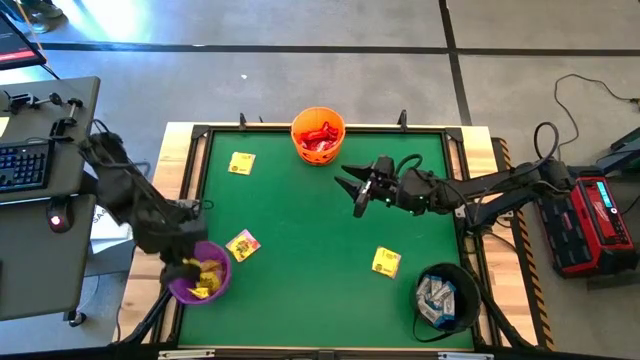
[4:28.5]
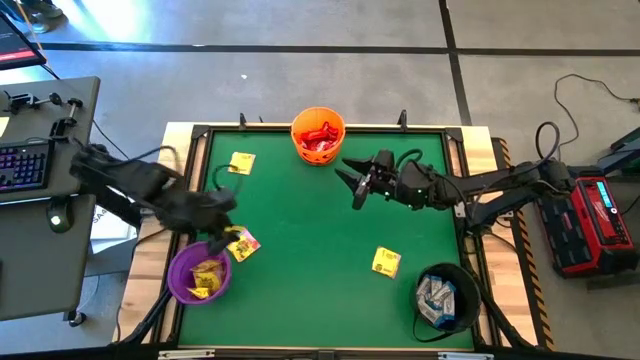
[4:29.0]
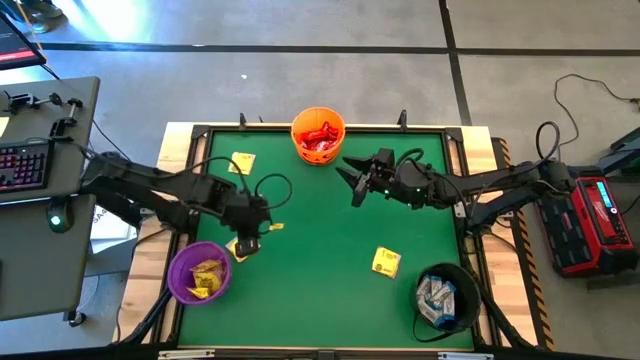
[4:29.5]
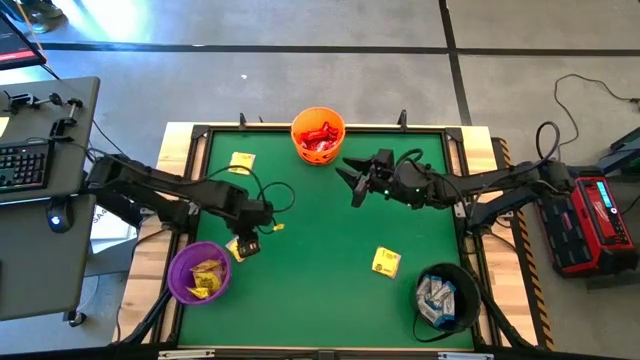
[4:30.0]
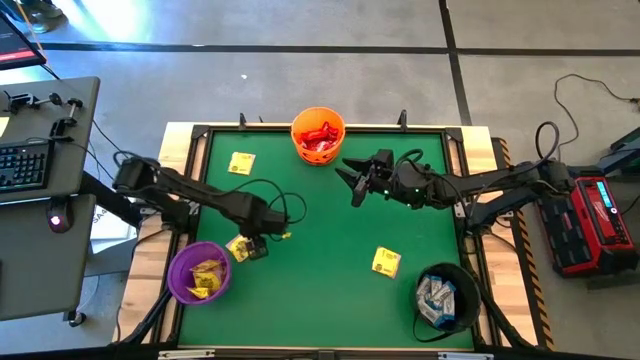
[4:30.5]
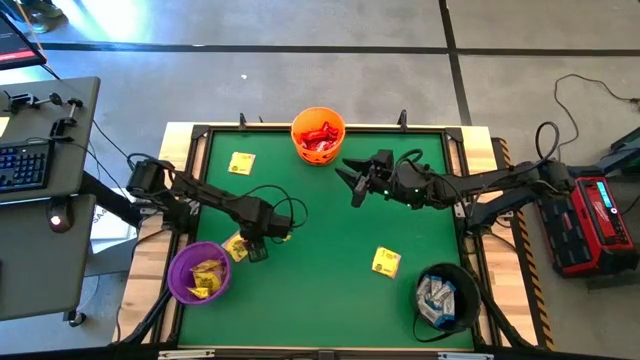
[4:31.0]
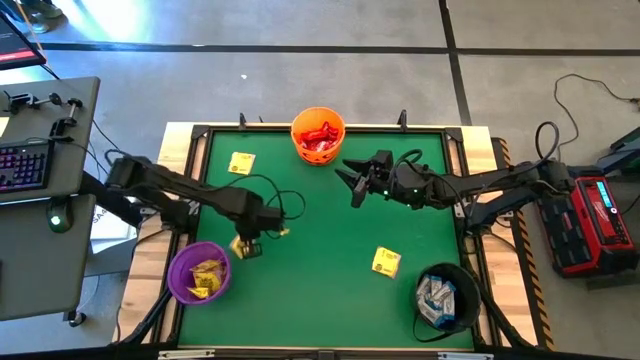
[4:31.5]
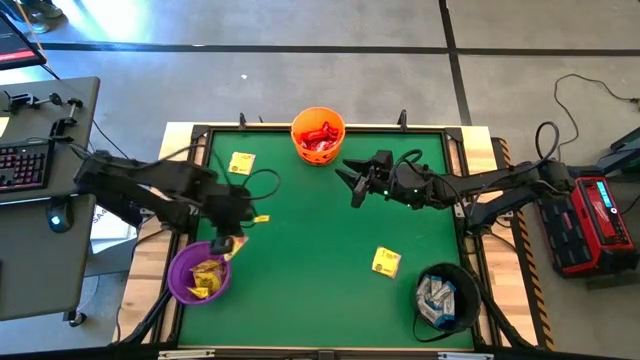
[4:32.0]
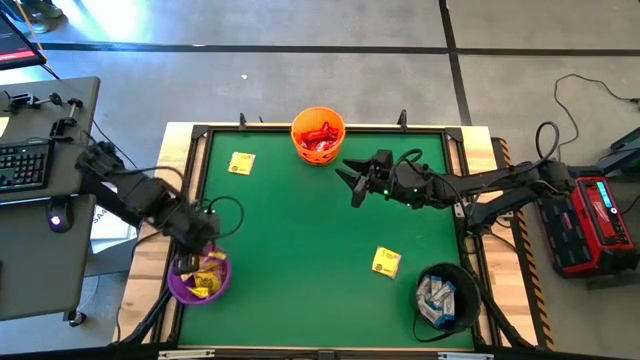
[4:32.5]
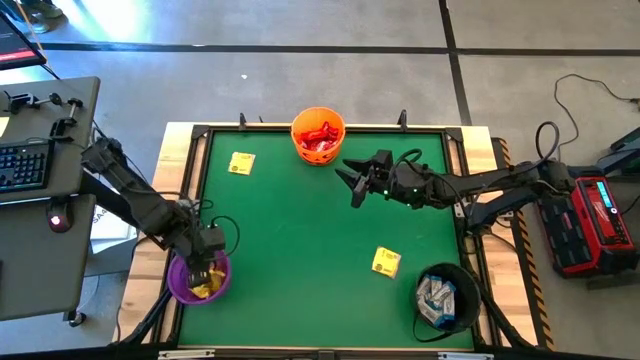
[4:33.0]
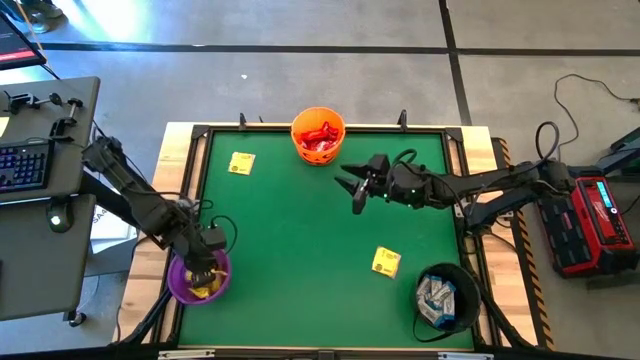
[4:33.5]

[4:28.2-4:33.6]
Task: Sort candy by brand, put in halloween buckets
Put the yellow candy into the purple bucket

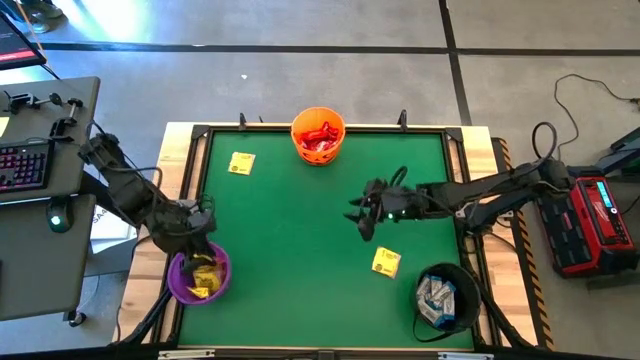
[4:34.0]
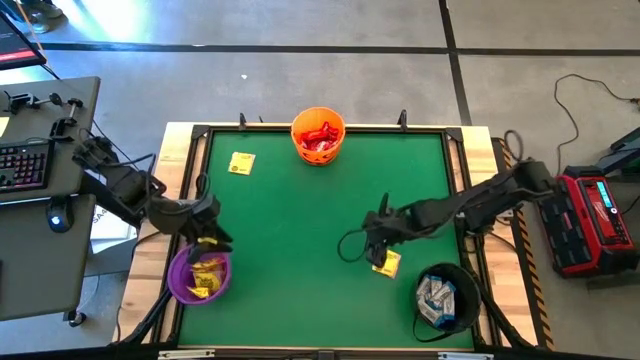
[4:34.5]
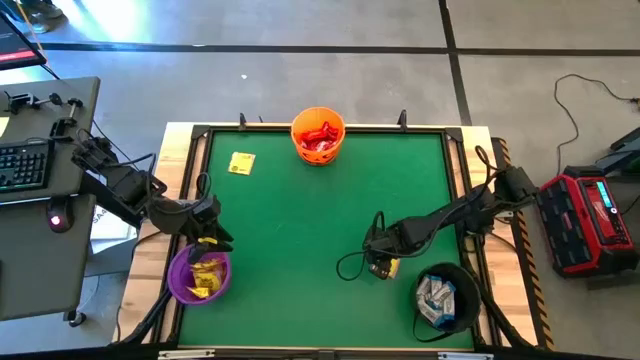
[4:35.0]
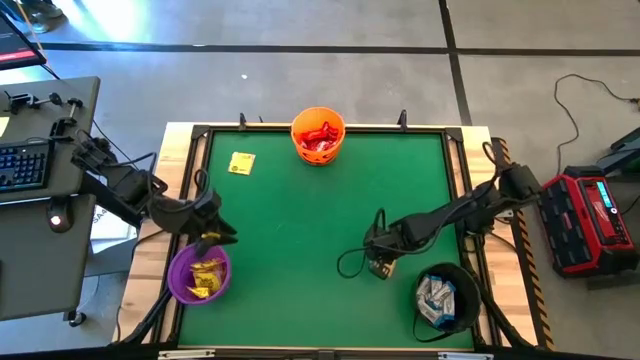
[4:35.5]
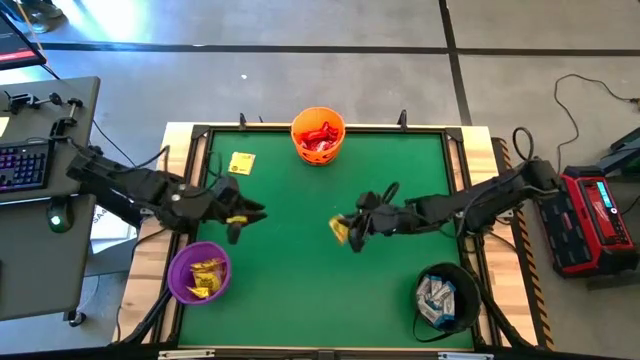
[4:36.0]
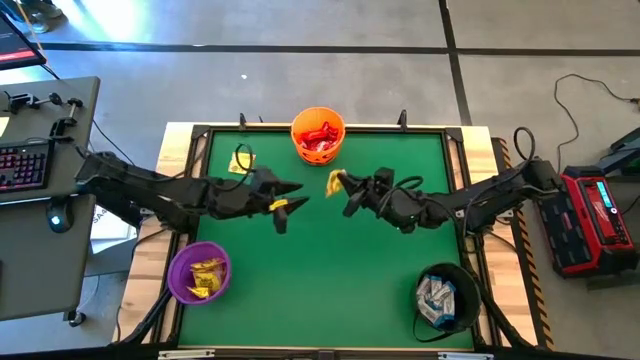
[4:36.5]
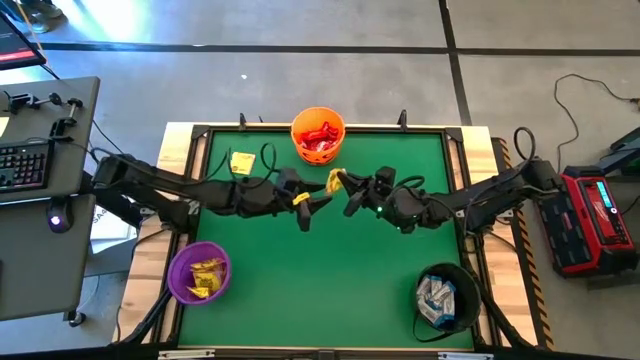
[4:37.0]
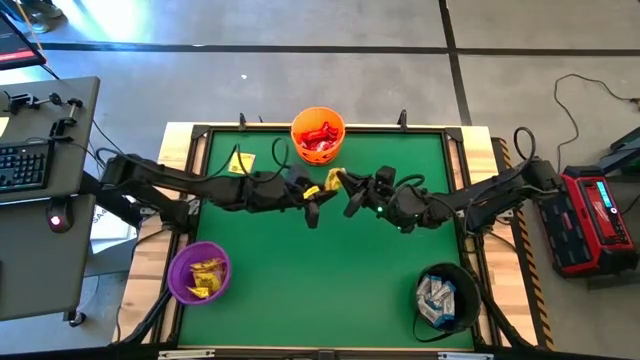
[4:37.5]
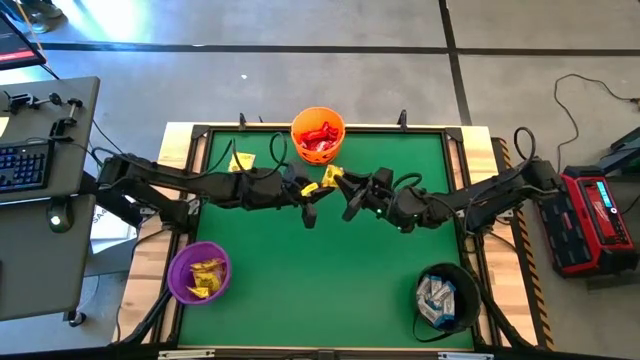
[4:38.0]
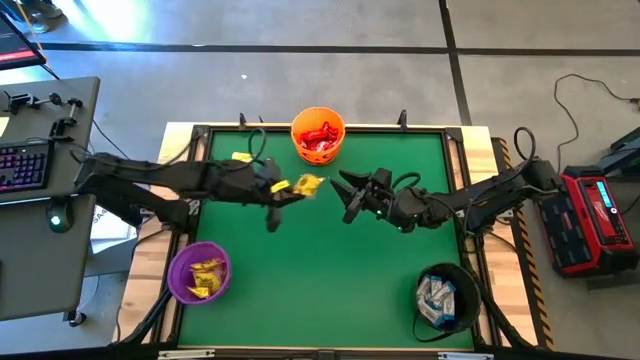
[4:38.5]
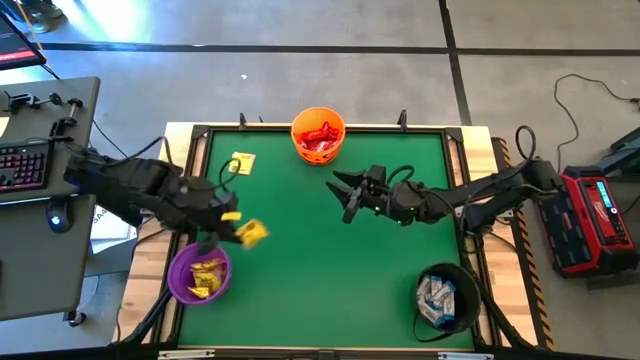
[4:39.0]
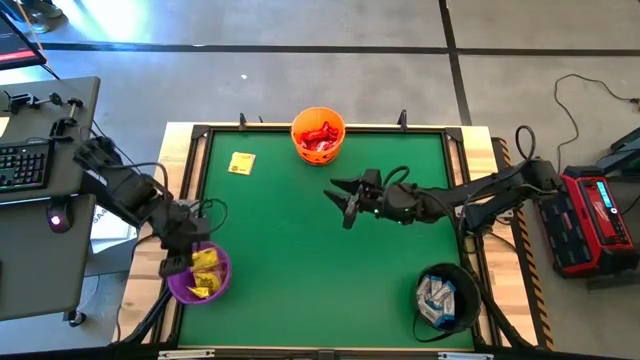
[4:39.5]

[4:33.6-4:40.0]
Put the yellow candy into the purple bucket

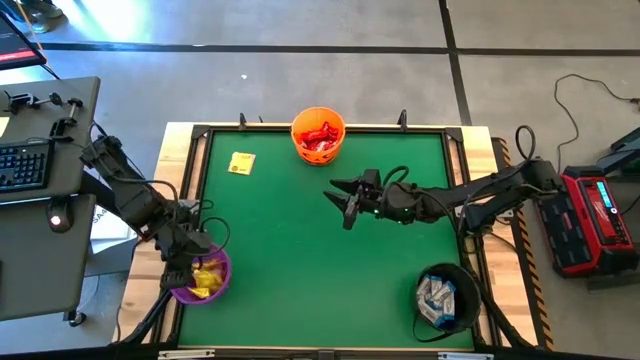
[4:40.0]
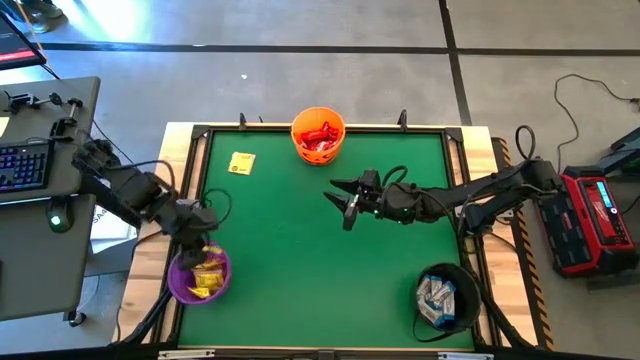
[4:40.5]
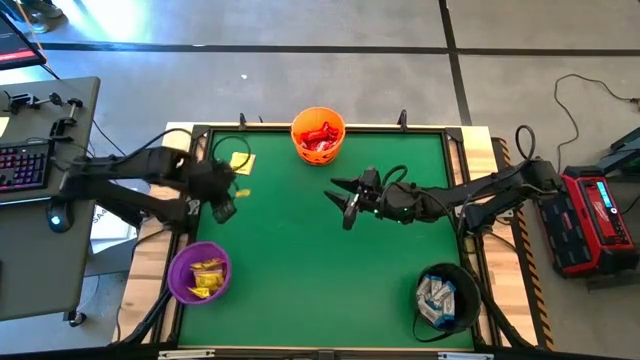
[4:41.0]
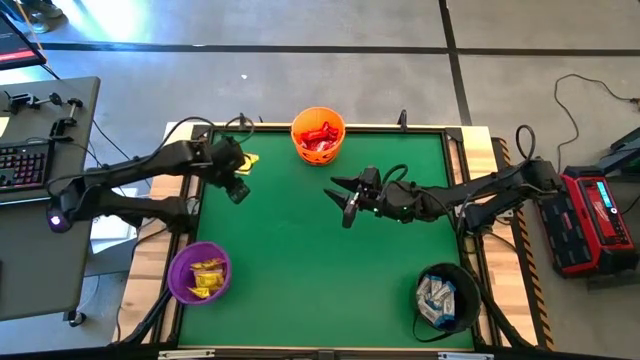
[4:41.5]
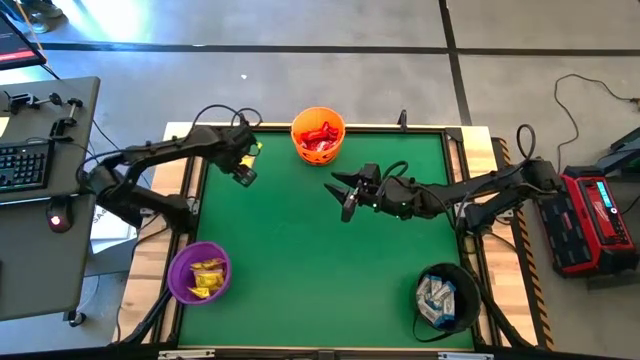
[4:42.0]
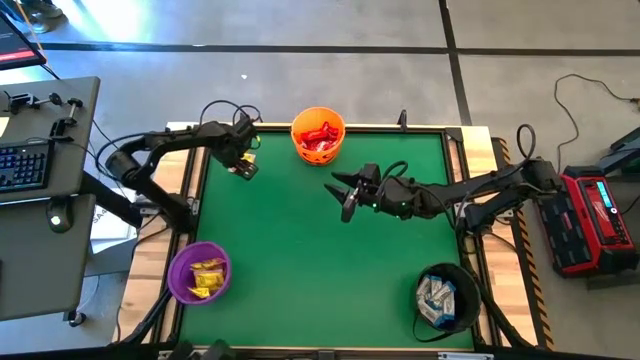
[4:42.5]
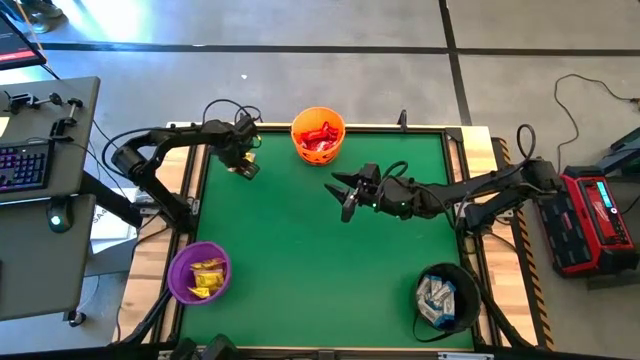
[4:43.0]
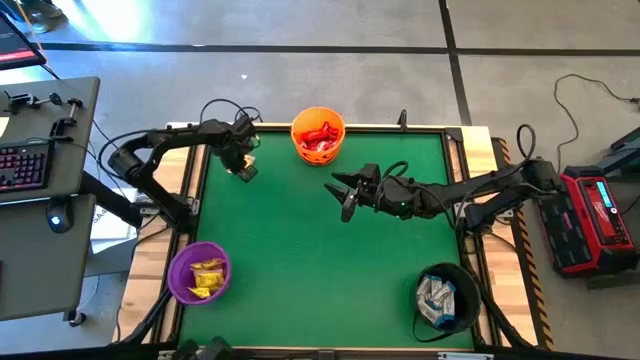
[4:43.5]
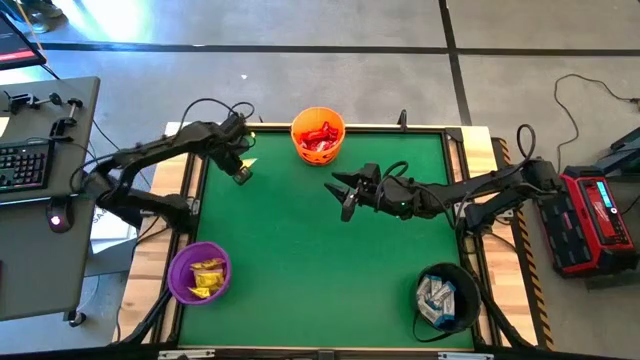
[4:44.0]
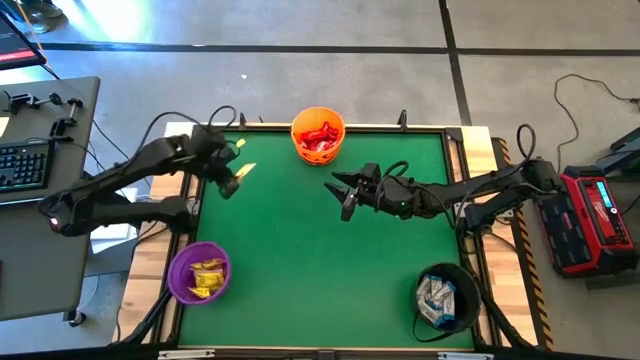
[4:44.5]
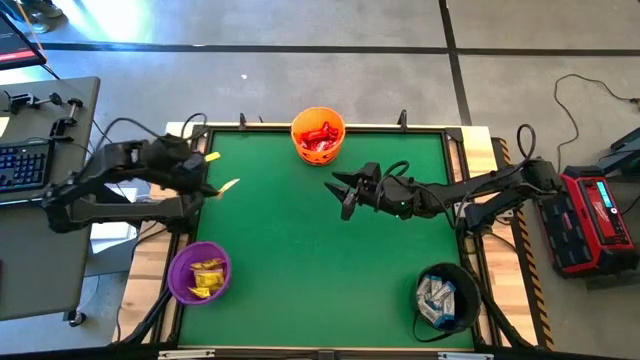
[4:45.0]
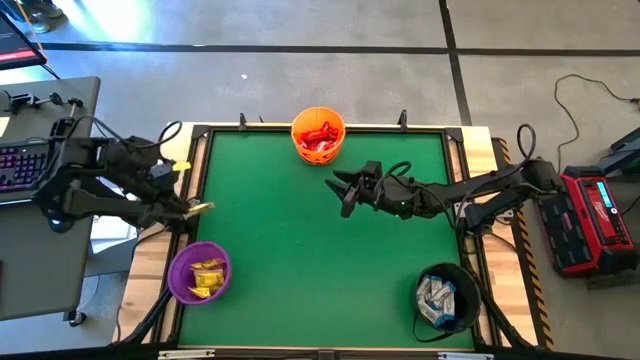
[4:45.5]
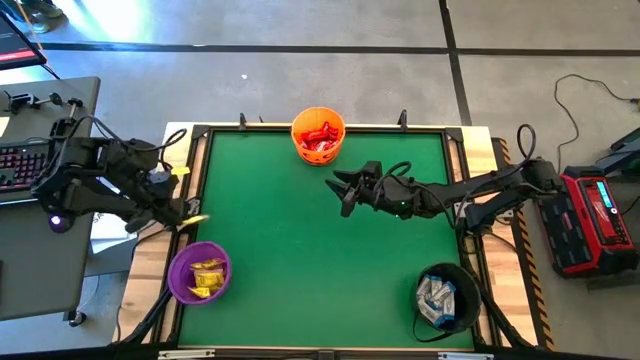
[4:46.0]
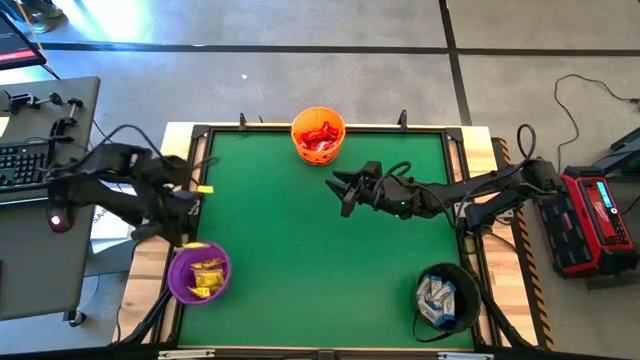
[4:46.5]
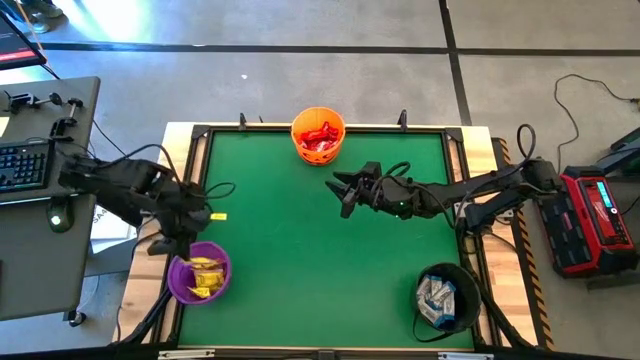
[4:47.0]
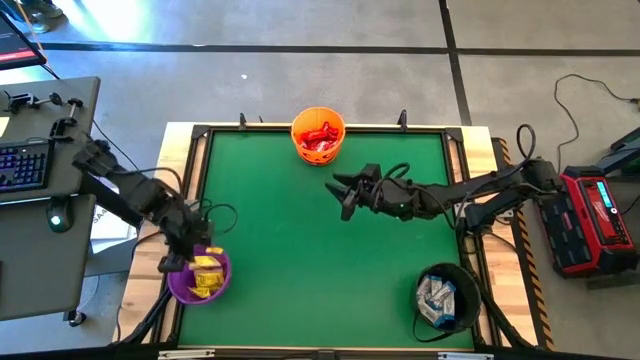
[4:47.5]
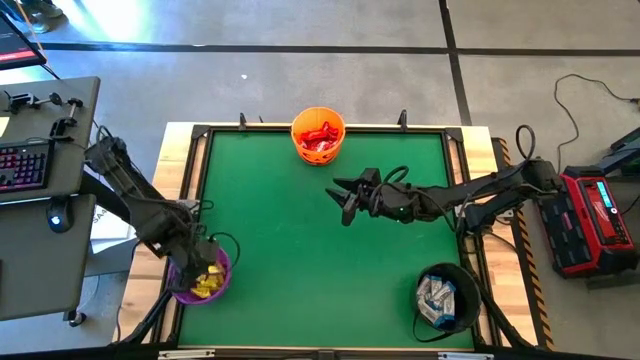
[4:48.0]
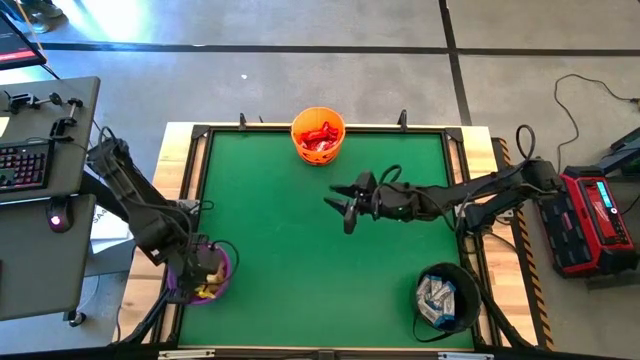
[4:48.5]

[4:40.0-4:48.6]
Put the yellow candy into the purple bucket

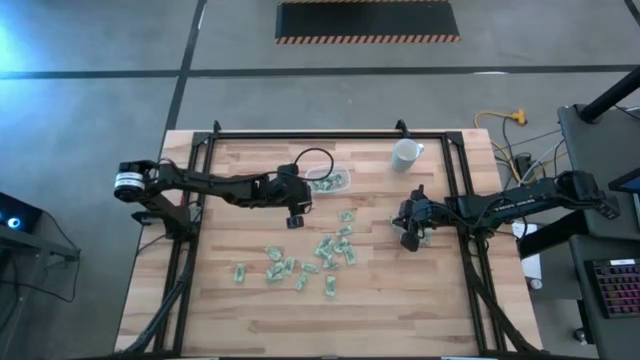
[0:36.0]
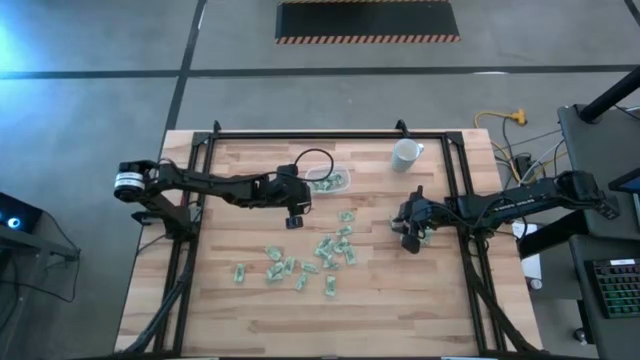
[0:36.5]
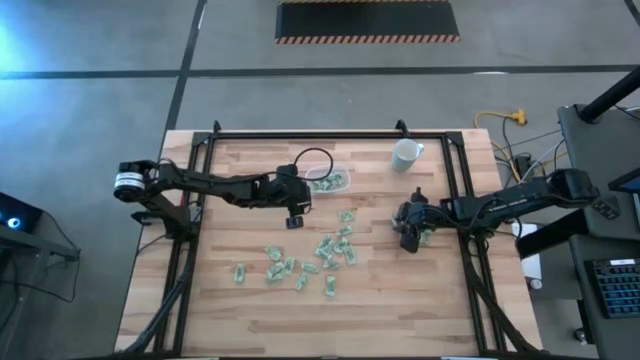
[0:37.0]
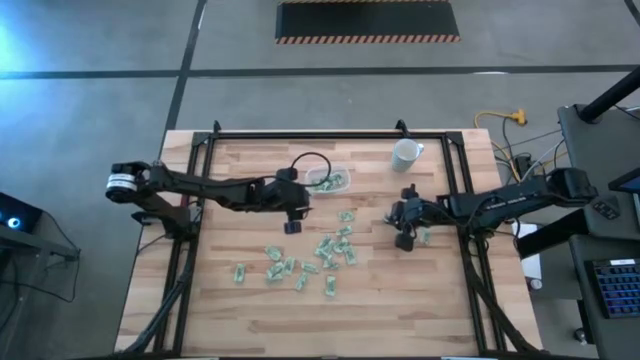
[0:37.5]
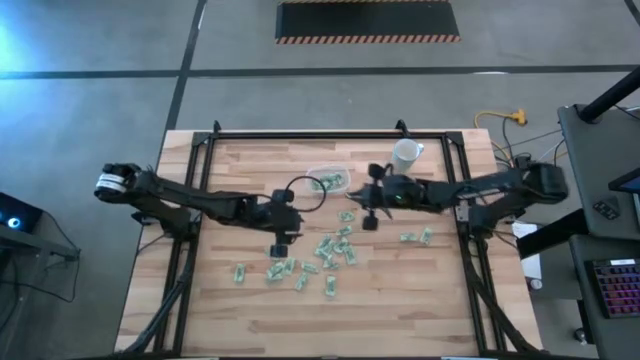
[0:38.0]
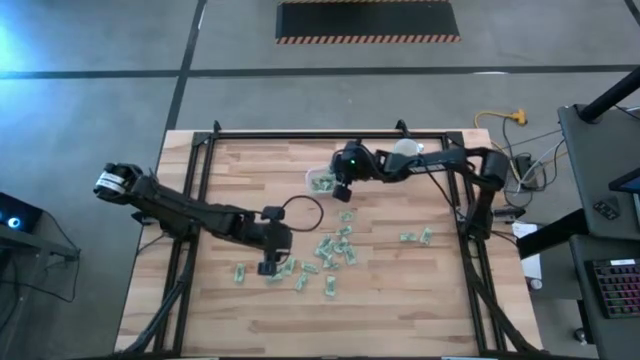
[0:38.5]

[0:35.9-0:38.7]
Task: Pick and place Stevia / Truvia into bins
Put the stevia packet into the transparent container
